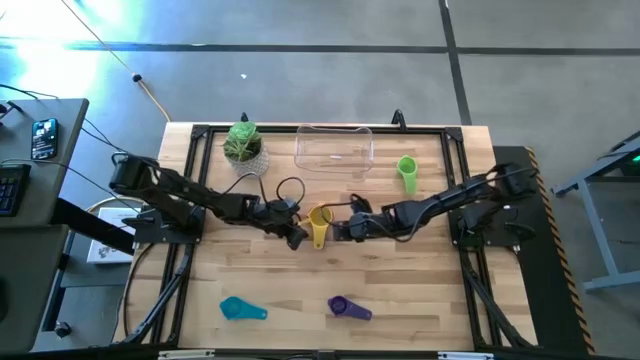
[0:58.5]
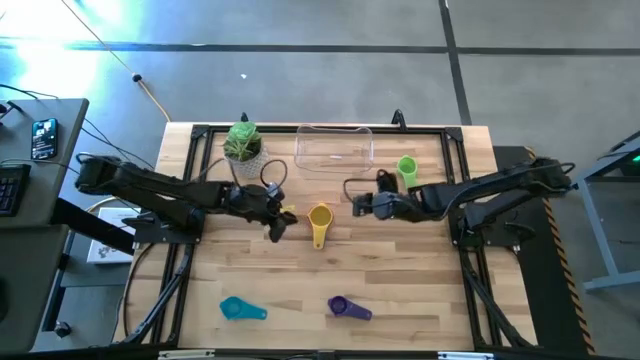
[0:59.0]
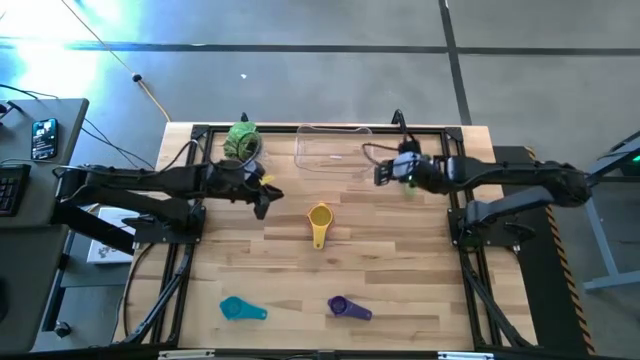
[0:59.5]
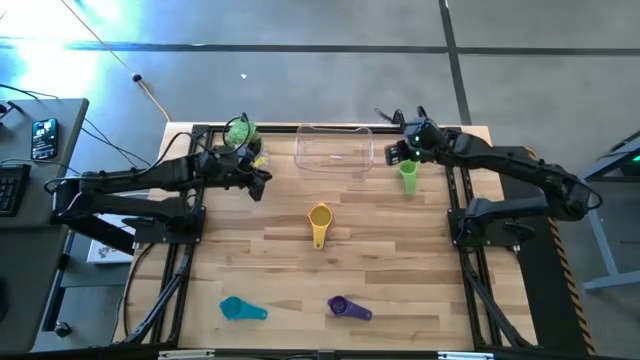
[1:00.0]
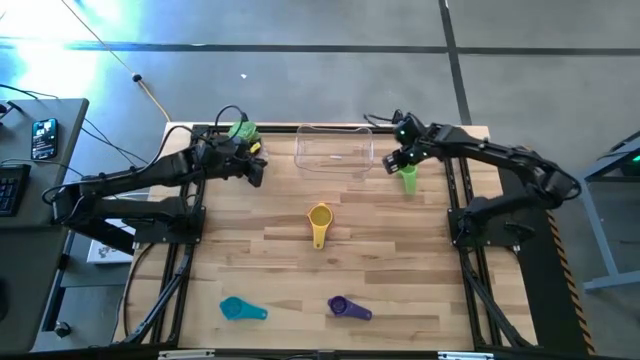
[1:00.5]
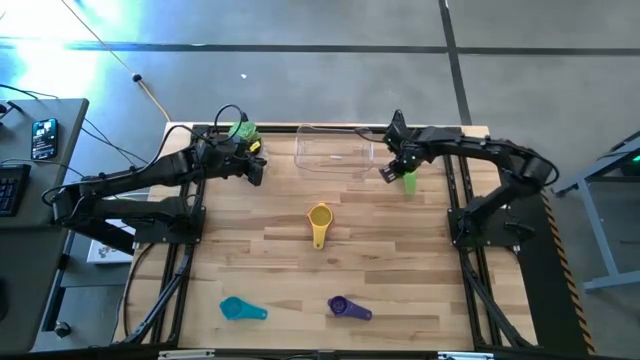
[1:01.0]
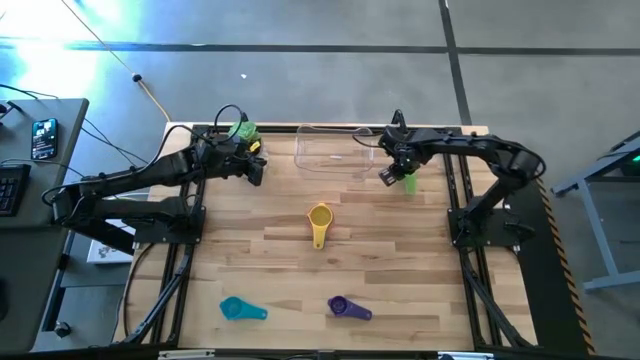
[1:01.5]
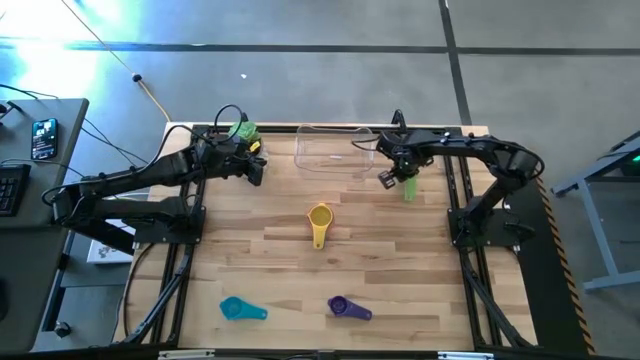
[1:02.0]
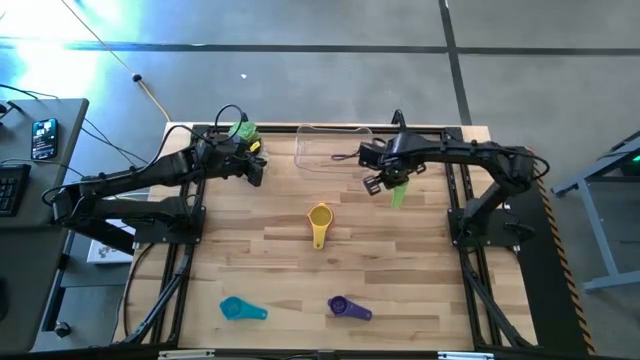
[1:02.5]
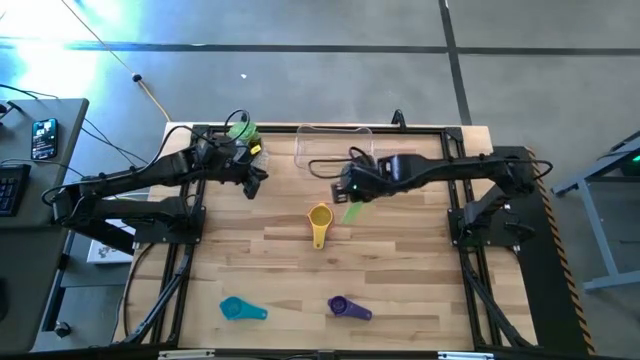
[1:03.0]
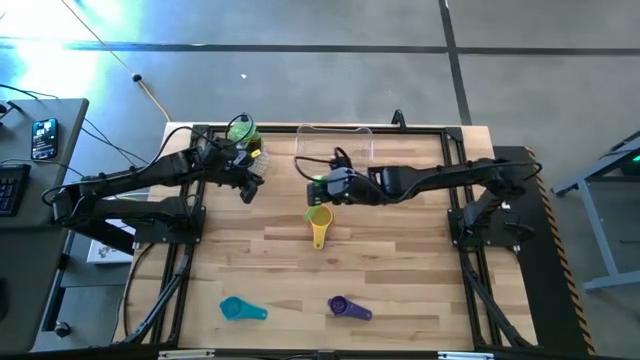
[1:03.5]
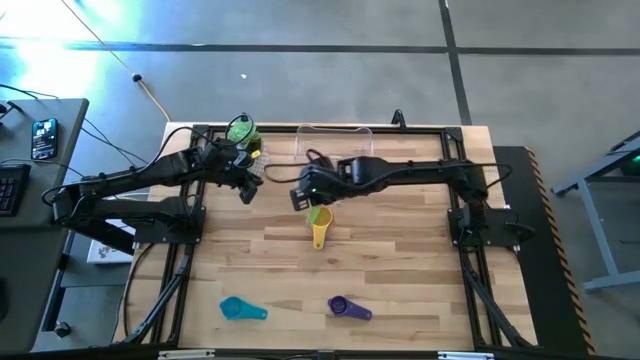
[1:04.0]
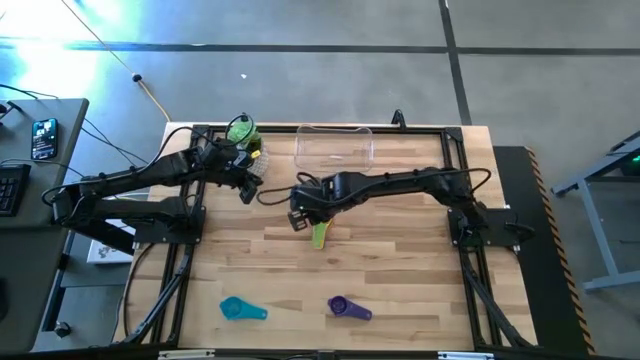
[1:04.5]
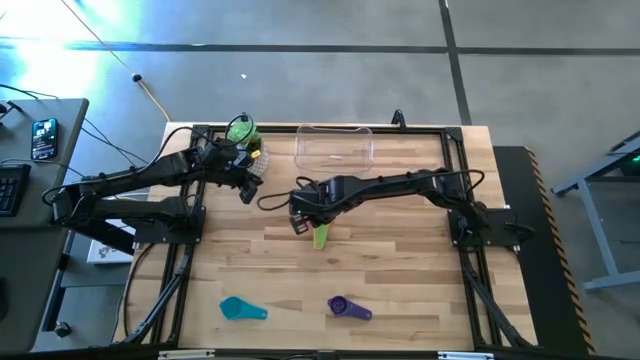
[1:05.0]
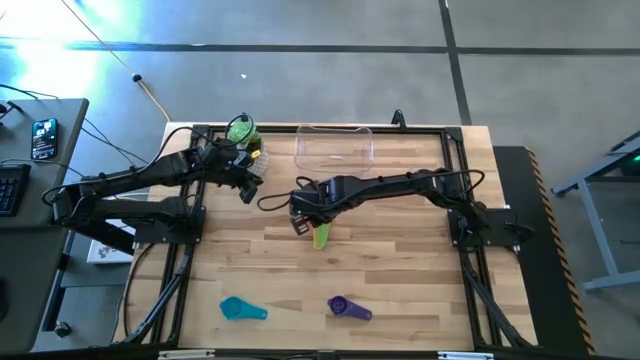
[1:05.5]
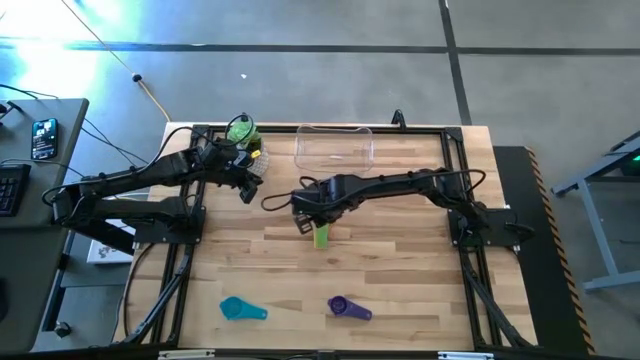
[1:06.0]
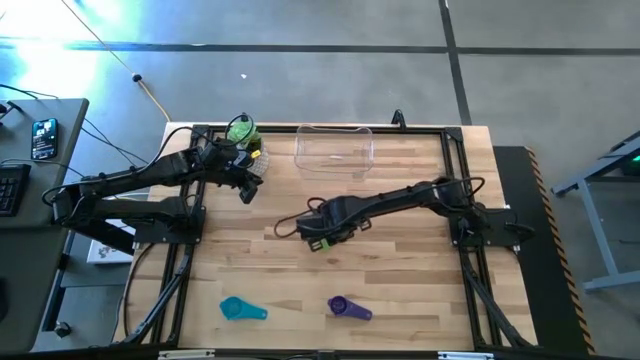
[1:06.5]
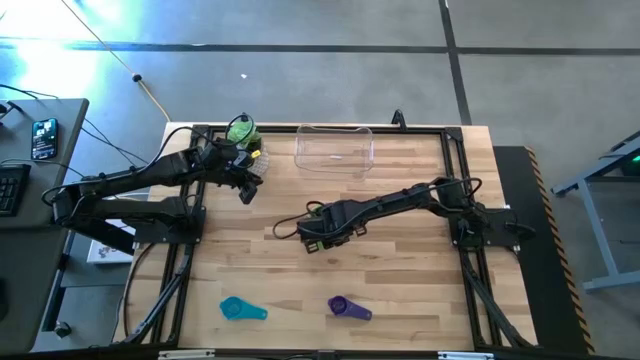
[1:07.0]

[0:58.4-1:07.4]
Task: Nest measuring cups in basket
Stack the green measuring cup on top of the yellow measuring cup

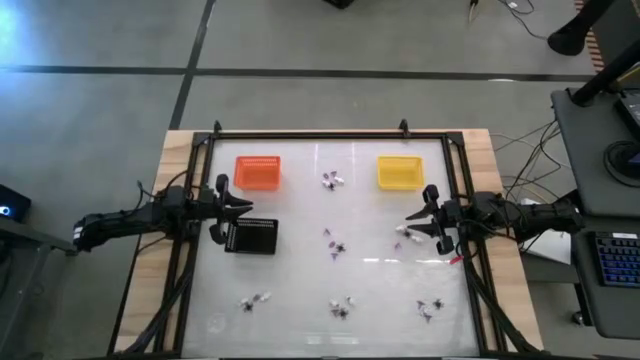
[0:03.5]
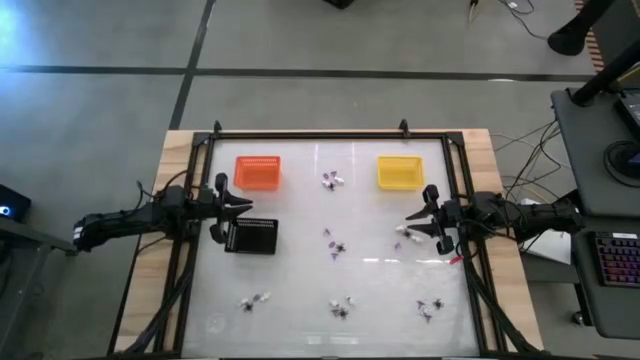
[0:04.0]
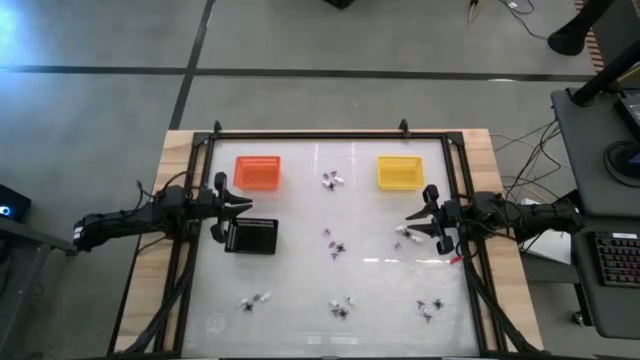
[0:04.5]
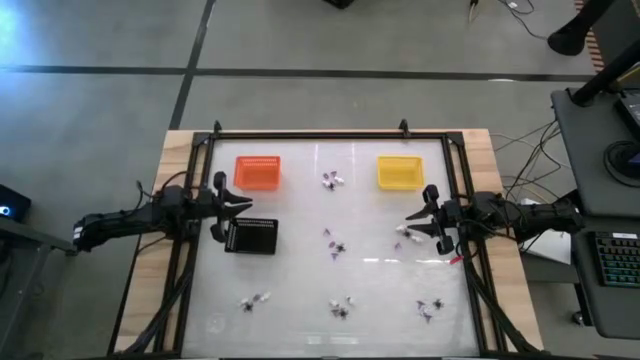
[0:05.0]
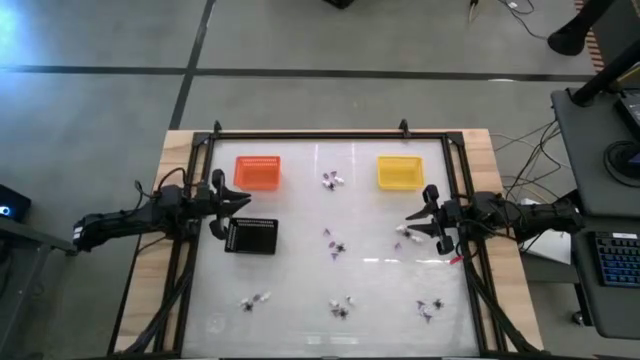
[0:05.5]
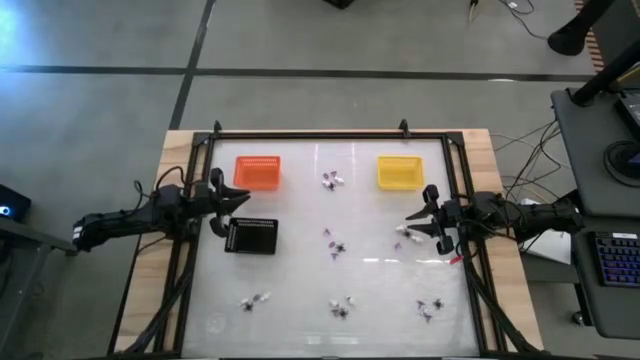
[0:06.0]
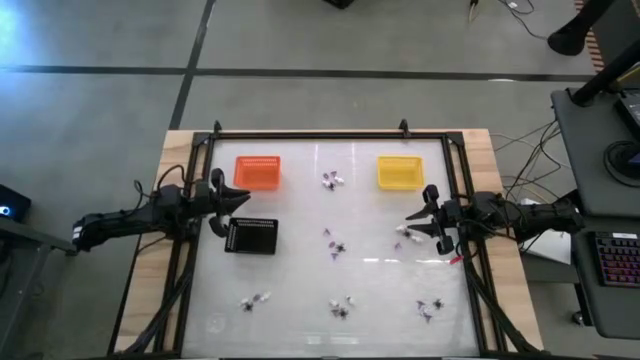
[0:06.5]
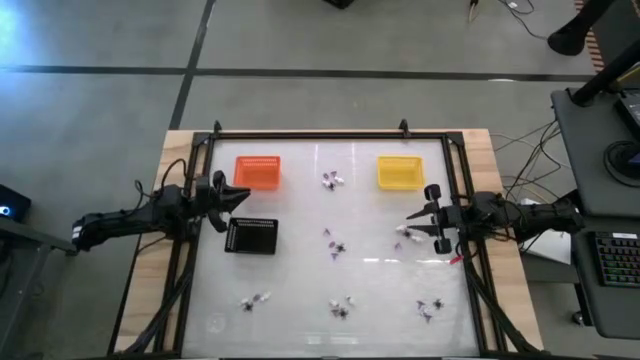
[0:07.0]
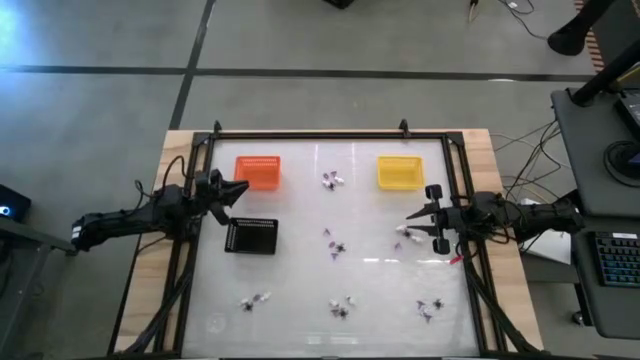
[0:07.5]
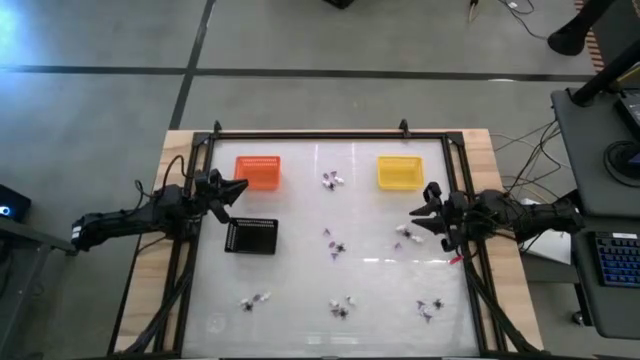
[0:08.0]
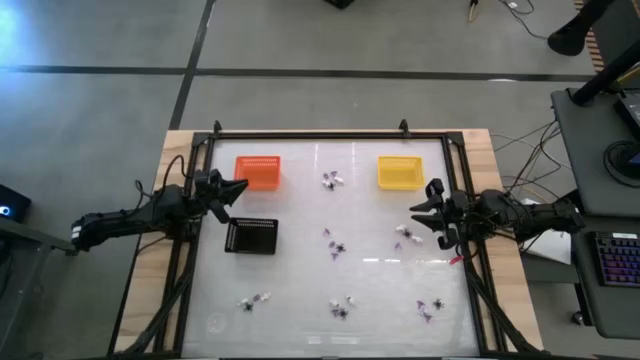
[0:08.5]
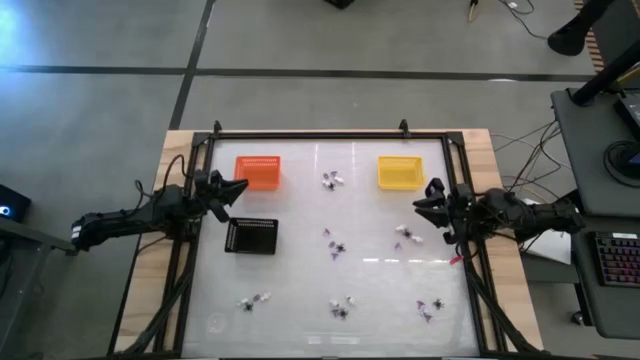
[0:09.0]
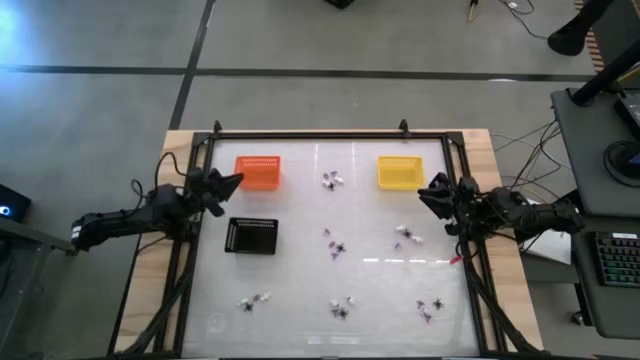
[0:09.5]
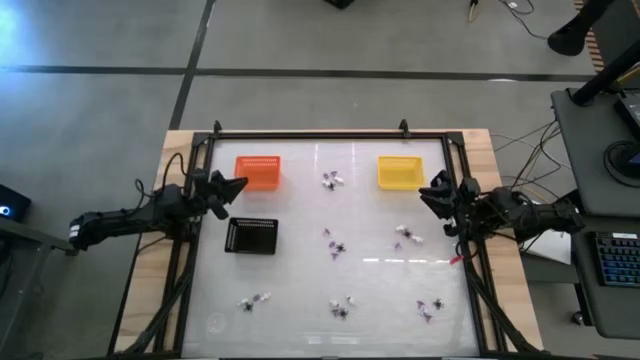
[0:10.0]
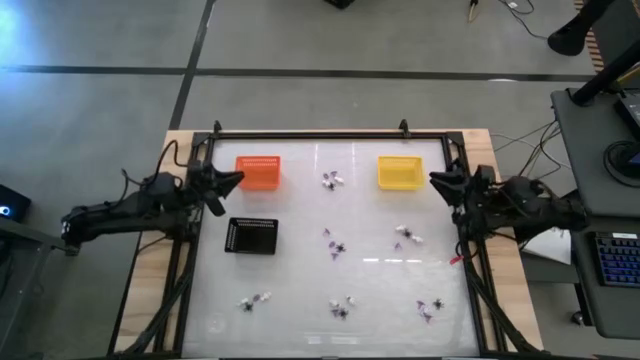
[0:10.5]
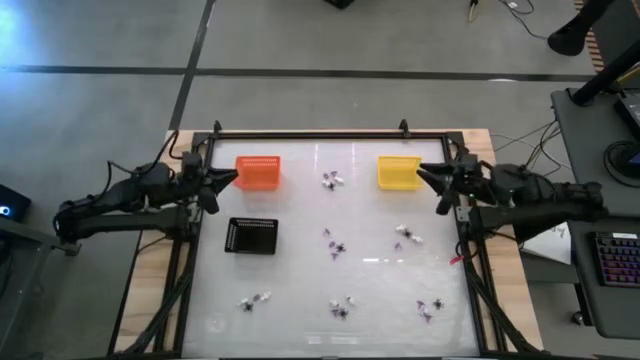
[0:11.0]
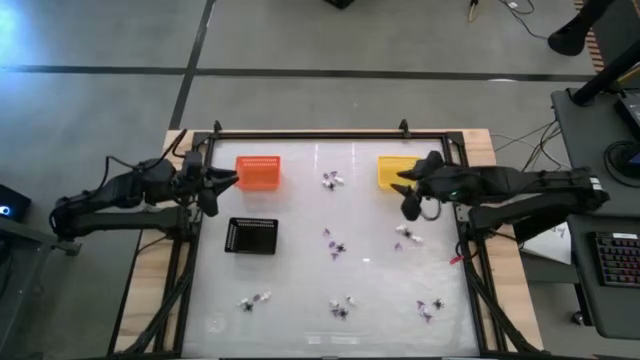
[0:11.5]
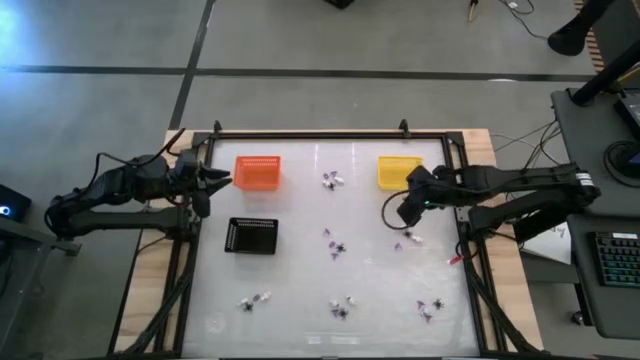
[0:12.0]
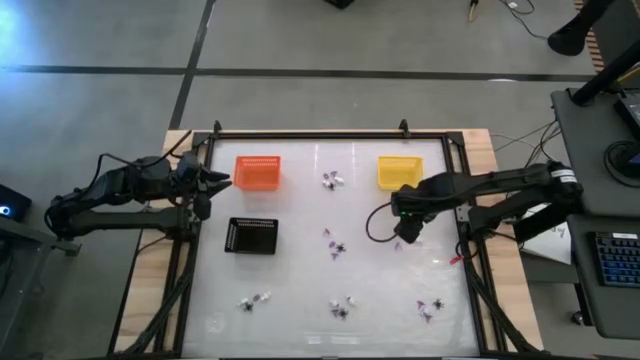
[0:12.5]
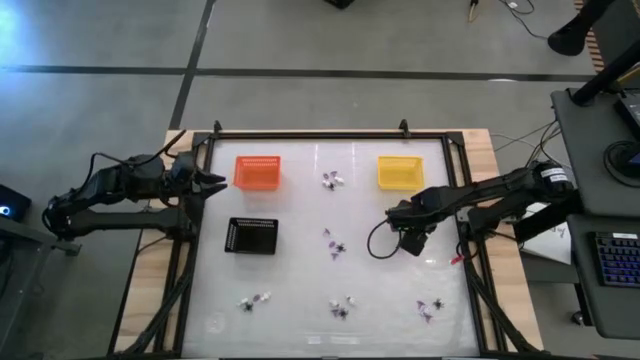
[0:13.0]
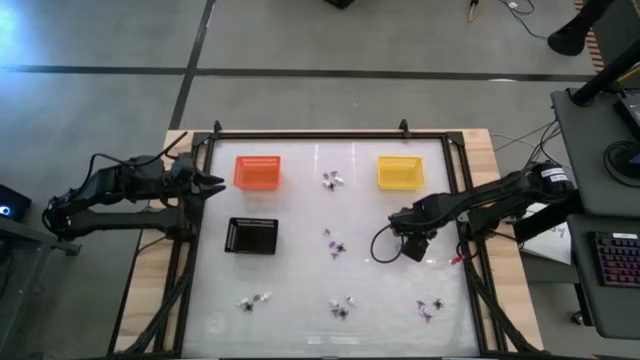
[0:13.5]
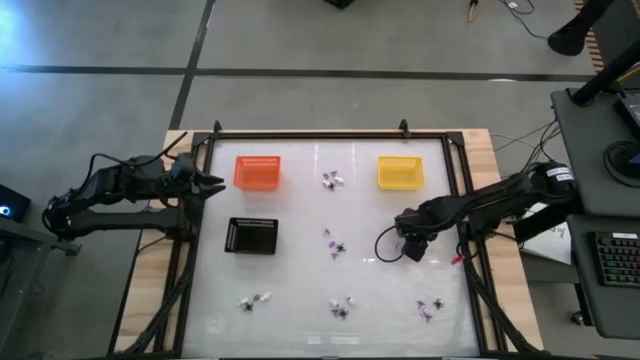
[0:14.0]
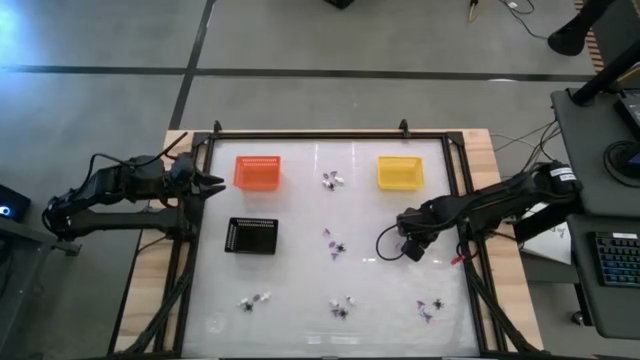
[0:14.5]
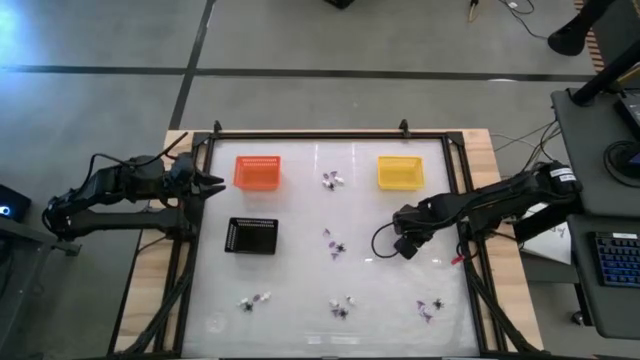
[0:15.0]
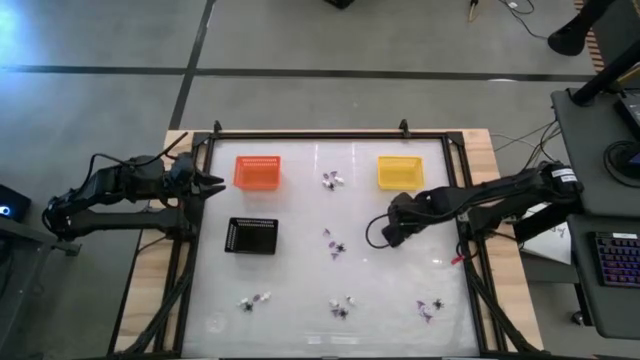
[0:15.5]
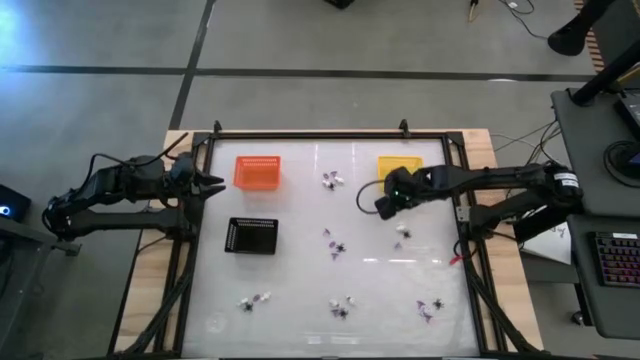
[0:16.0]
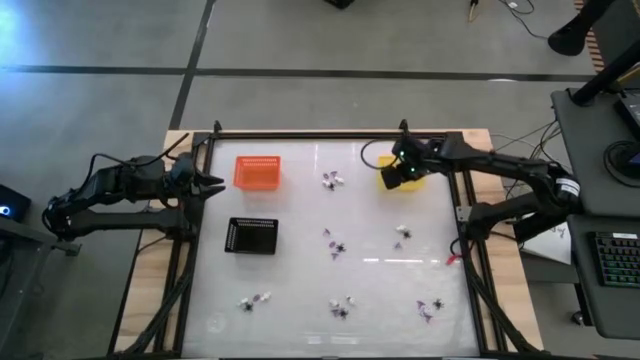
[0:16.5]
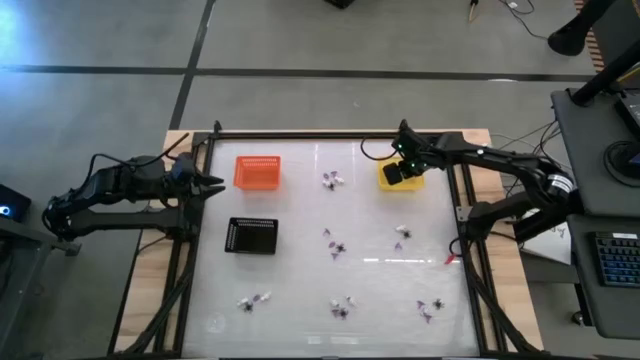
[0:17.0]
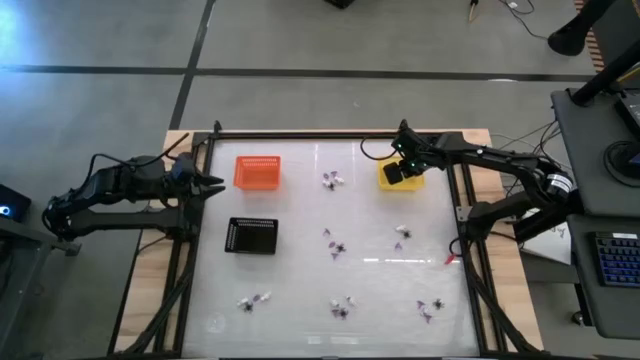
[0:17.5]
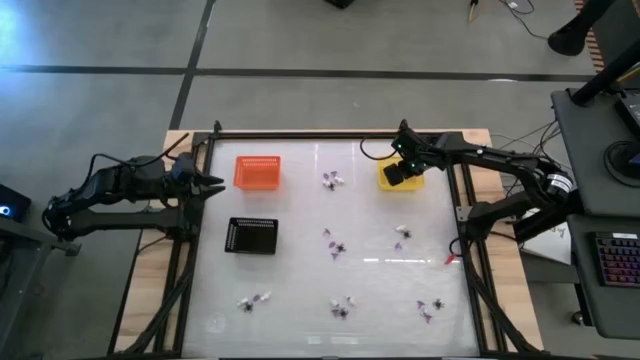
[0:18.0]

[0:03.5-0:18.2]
Task: Sort Halloween decoration
Put the white skeleton toy into the yellow bin
